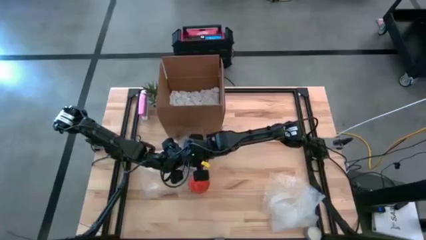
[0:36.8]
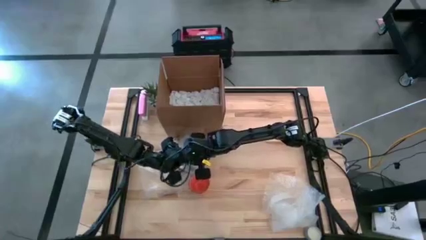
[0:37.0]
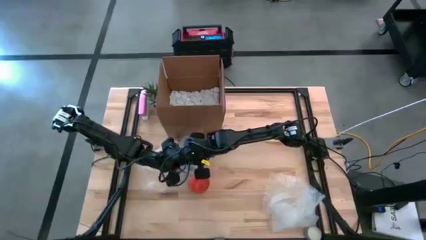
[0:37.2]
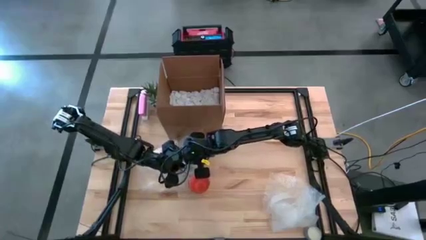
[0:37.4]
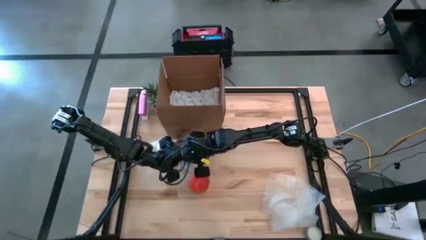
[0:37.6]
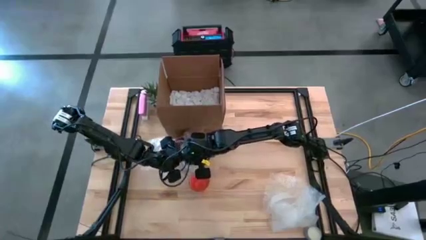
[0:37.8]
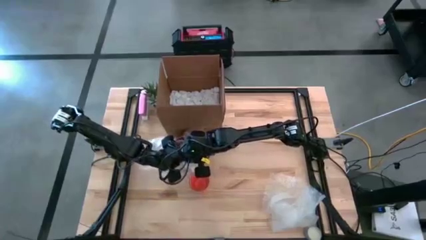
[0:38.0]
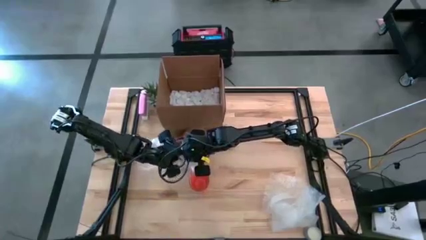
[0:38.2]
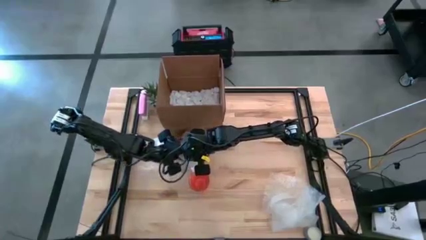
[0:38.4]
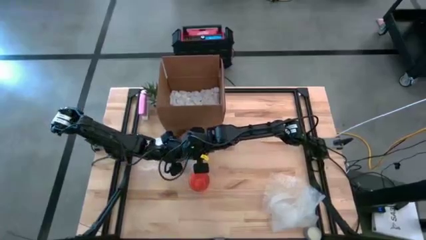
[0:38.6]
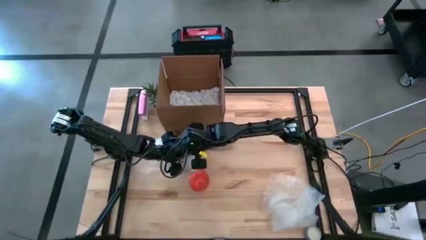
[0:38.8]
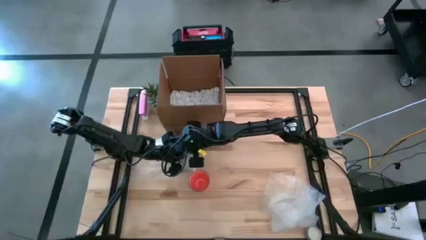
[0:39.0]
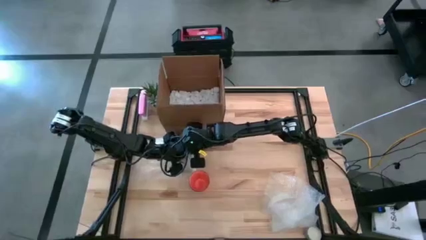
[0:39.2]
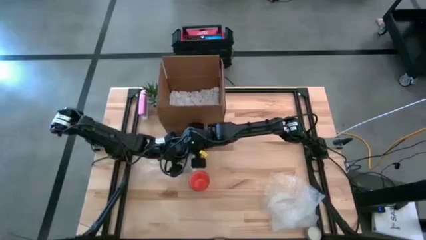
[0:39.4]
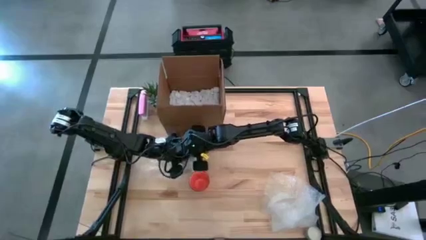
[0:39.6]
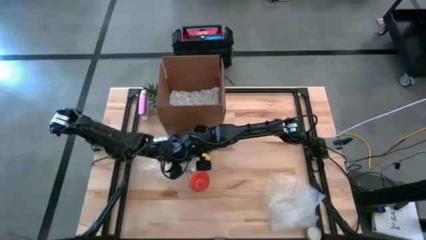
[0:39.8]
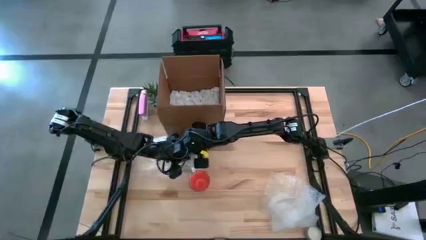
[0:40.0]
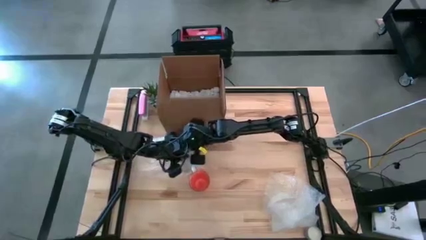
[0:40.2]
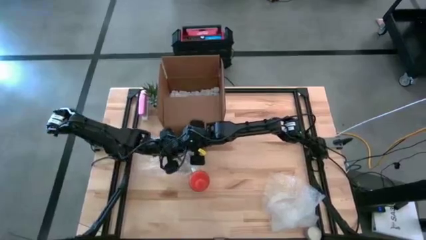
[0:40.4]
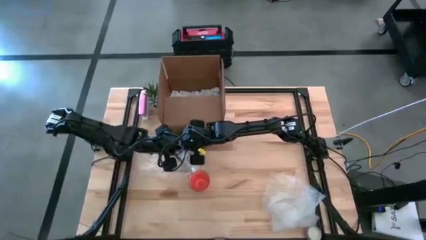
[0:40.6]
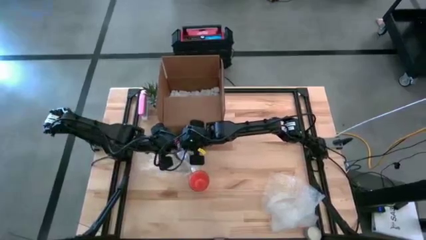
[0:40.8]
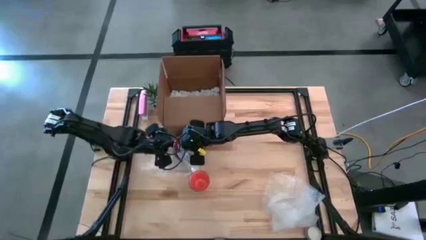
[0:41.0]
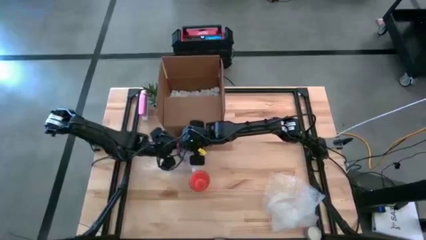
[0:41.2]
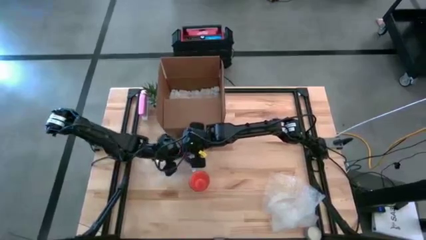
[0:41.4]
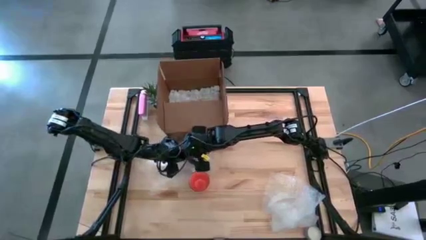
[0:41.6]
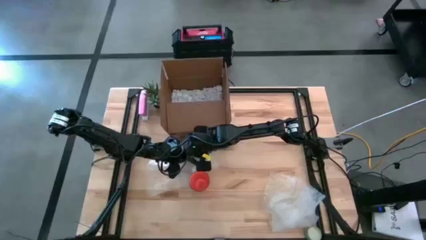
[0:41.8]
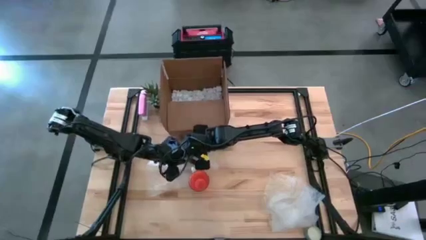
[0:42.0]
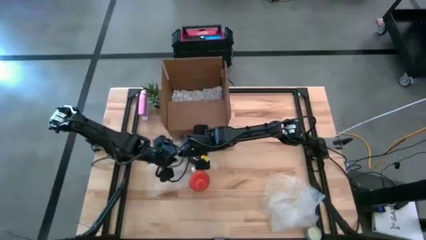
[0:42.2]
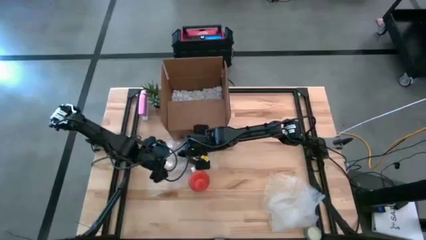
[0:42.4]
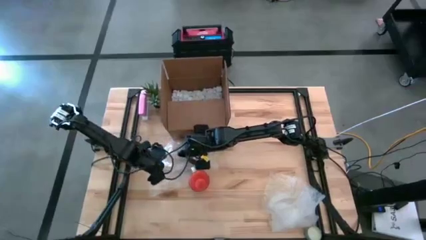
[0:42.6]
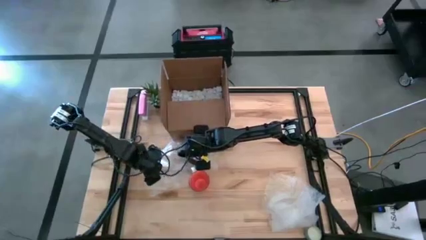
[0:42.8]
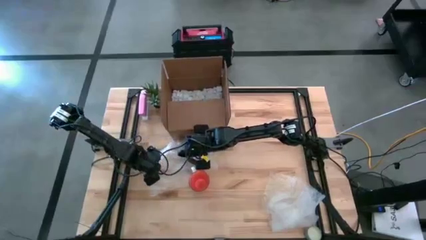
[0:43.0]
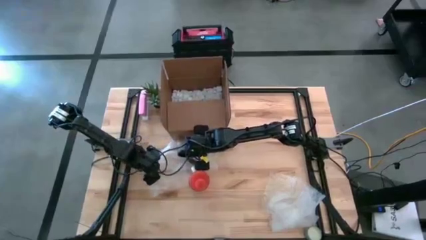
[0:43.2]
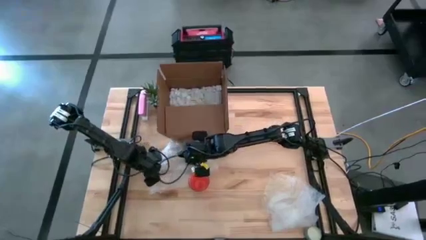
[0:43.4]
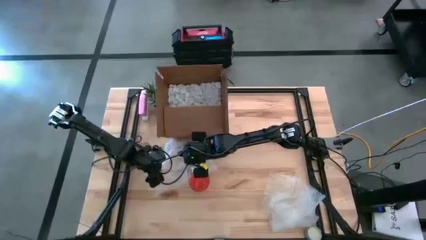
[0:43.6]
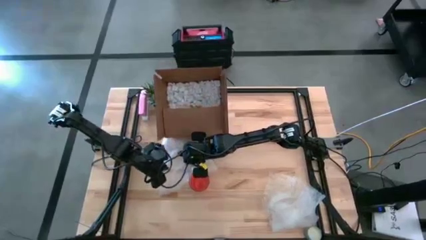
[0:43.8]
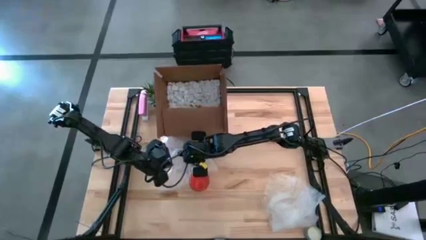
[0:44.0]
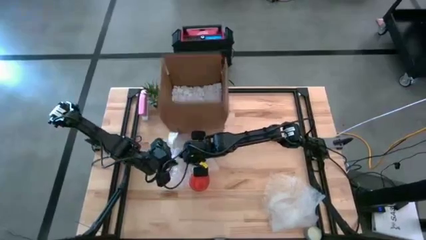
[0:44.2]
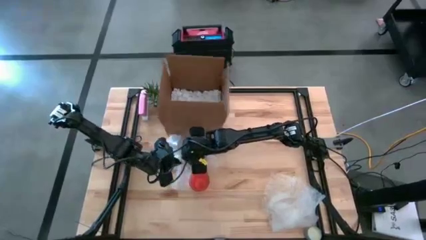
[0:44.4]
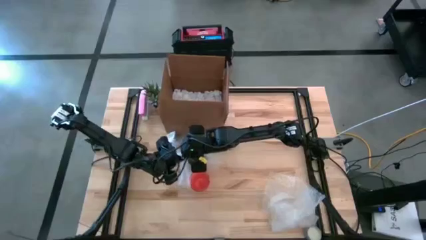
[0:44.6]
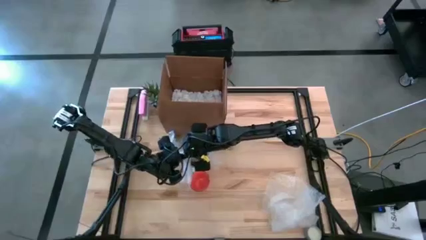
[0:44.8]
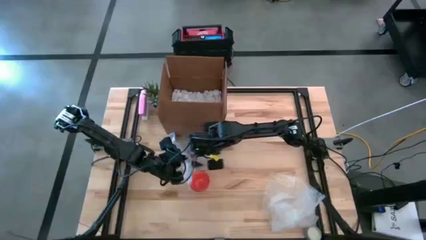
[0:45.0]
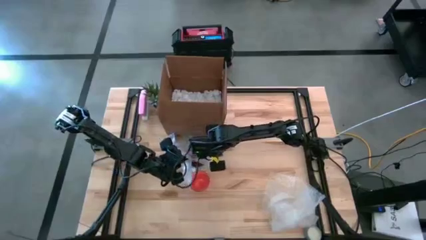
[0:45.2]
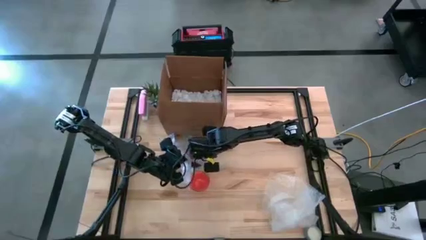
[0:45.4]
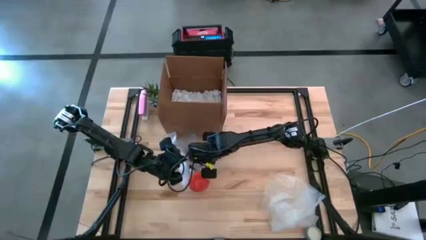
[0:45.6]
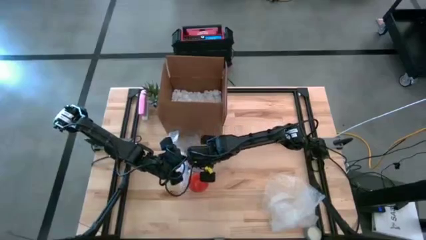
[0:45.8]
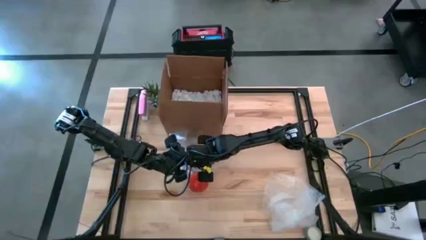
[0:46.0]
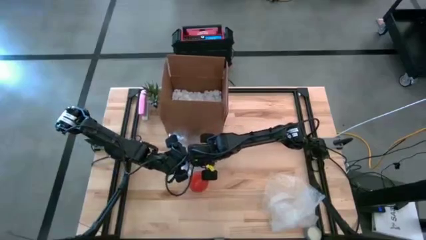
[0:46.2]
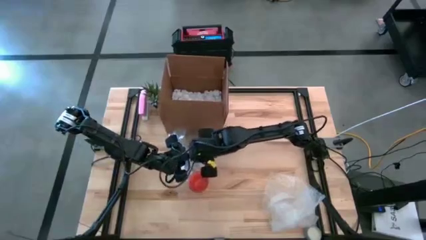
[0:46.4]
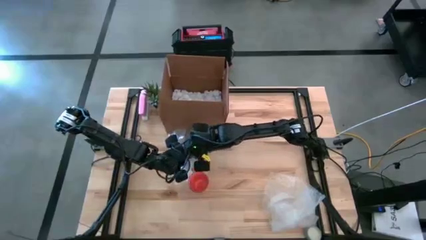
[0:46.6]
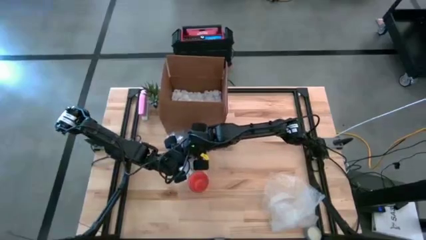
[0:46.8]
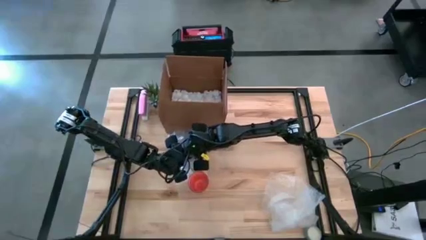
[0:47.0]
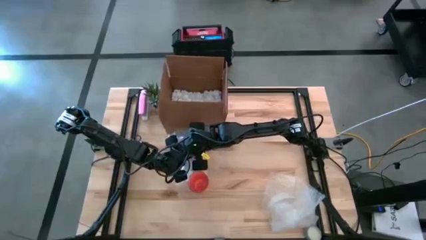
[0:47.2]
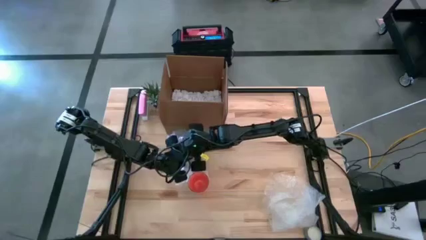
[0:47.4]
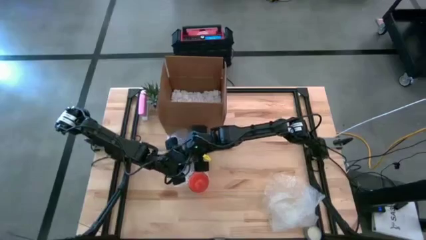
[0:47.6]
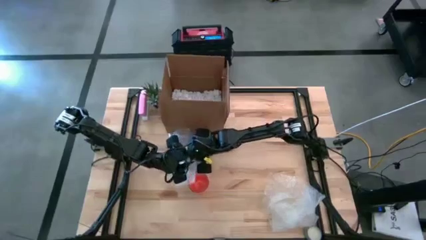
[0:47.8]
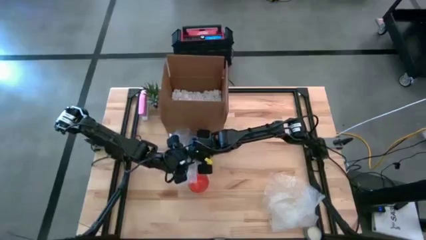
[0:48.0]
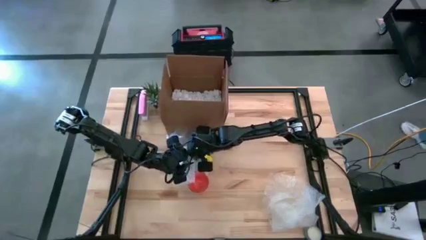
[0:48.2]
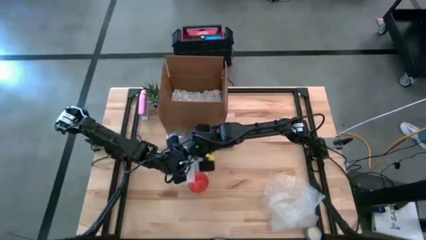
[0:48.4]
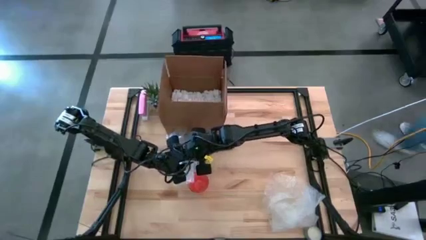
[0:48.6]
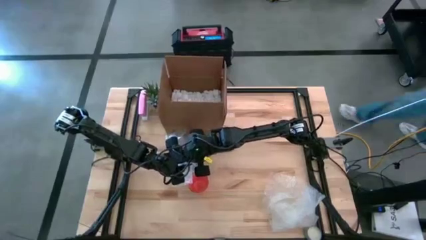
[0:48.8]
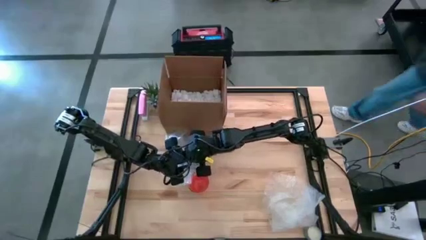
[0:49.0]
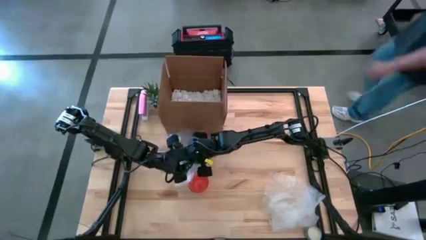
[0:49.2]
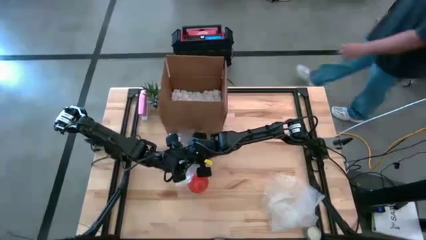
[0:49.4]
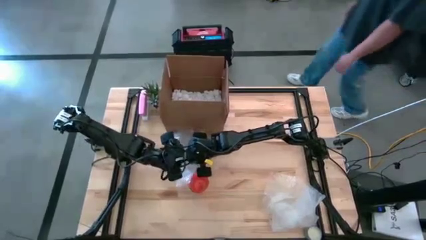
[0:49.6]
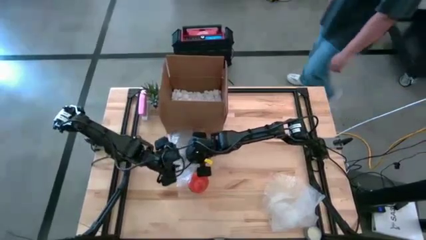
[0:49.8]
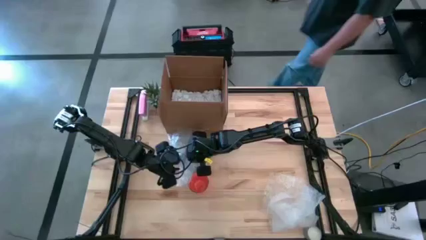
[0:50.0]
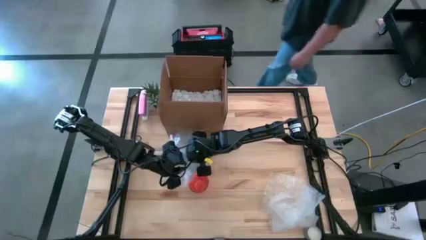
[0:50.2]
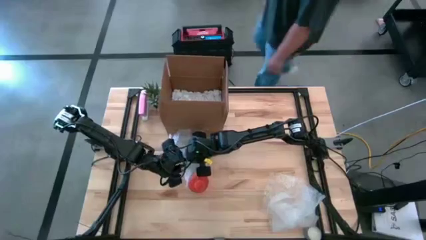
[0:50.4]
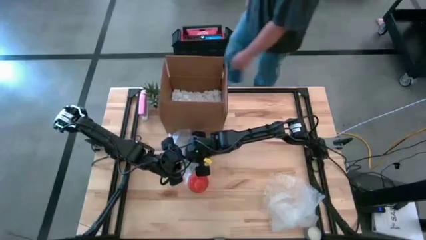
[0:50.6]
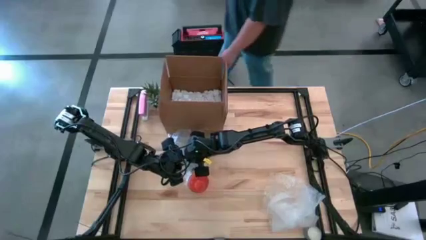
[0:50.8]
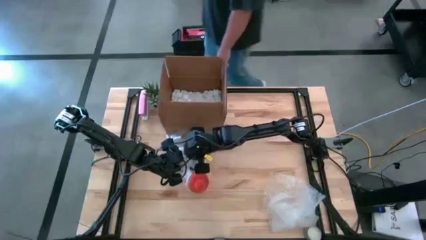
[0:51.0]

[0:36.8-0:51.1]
Task: wrap mug
Wrap the black mug with transparent bubble wrap

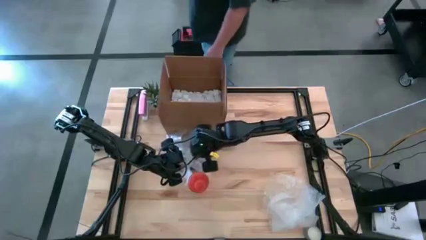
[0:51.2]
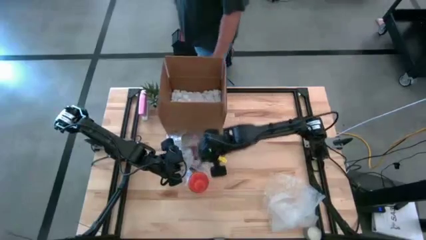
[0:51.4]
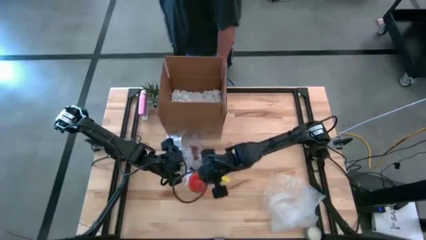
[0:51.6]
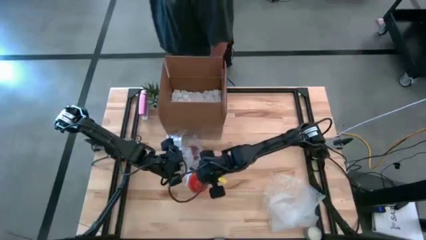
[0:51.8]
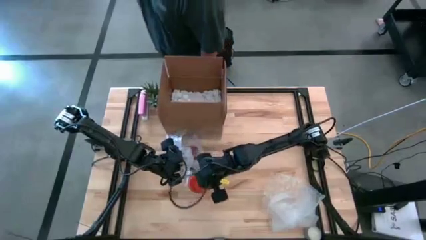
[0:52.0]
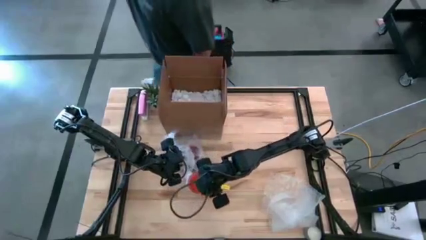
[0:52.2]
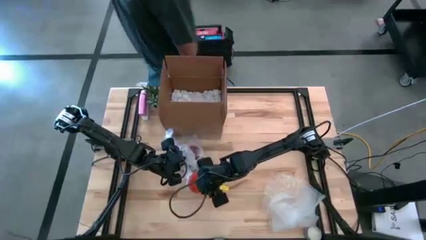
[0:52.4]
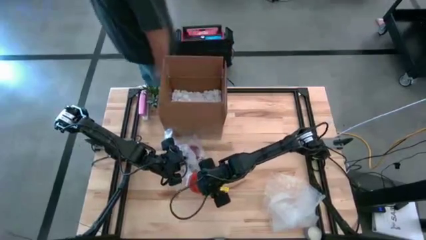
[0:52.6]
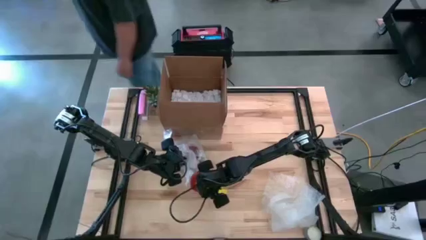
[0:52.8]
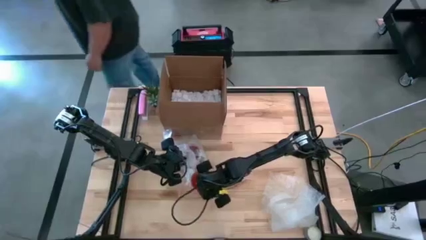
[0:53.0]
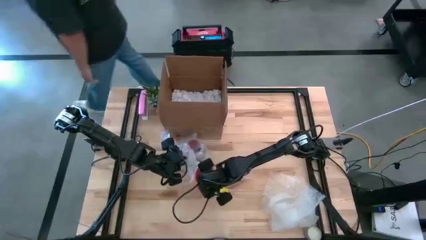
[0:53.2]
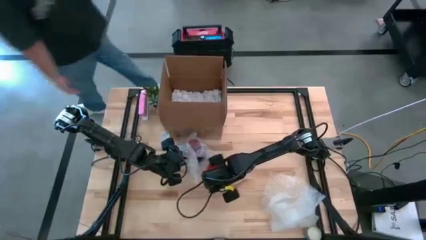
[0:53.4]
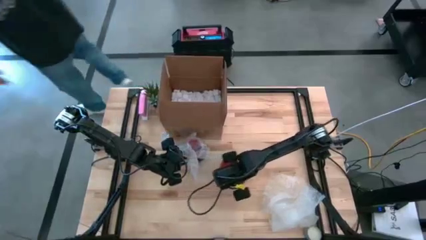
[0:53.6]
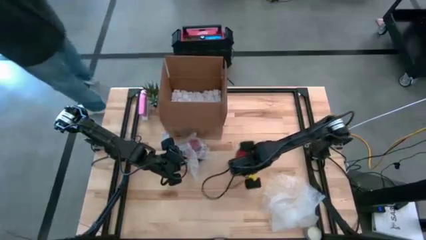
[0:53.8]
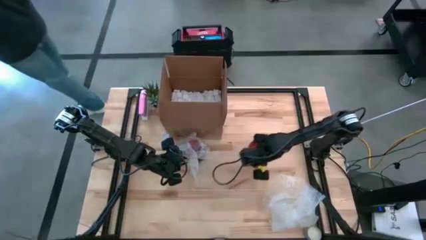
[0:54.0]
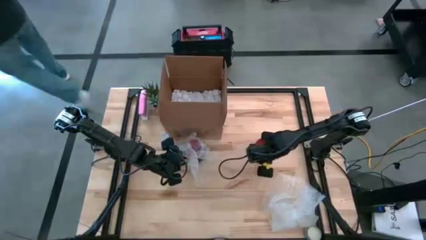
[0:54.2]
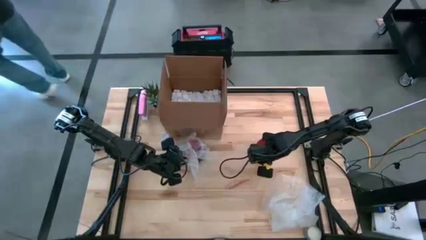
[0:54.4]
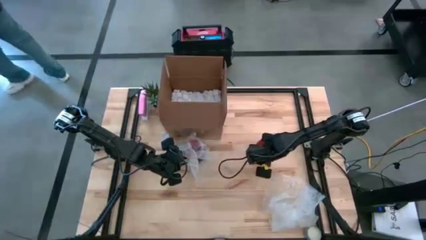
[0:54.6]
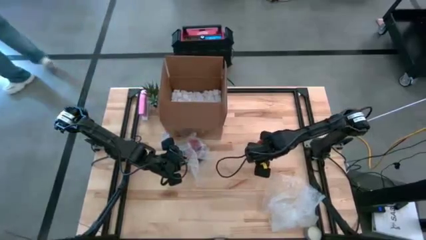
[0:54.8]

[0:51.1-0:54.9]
Move the orange mug to the middle right of the table
